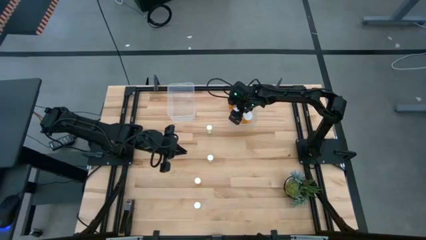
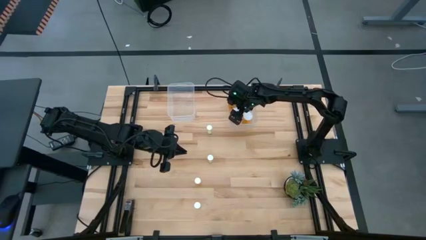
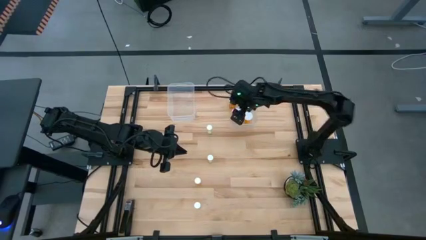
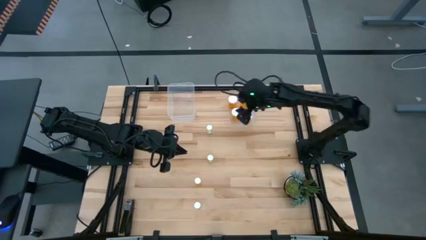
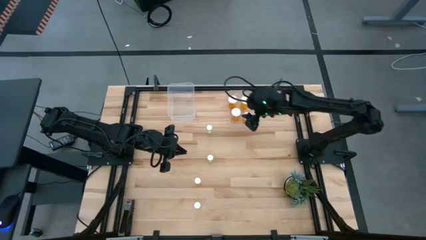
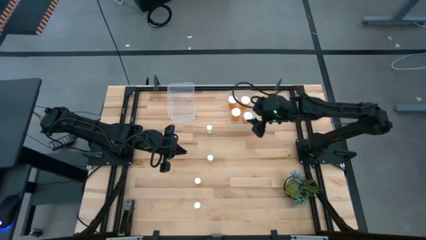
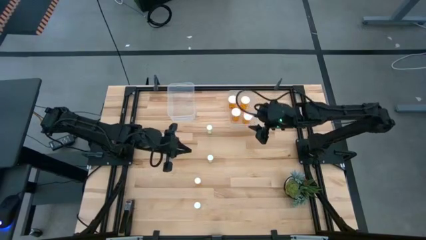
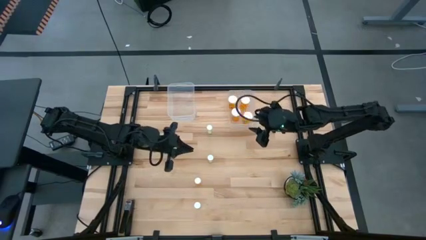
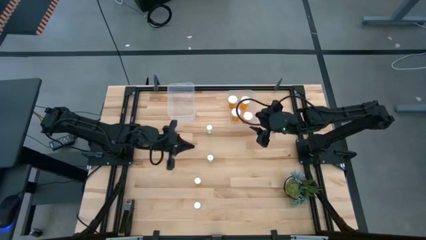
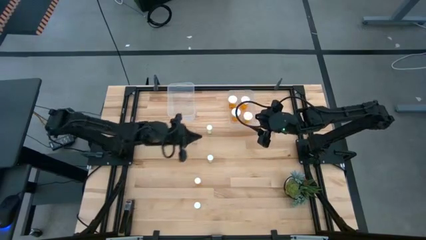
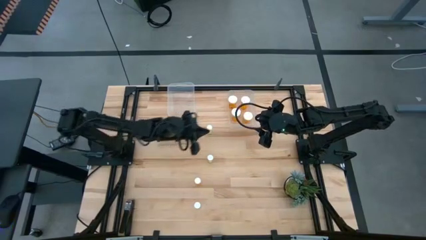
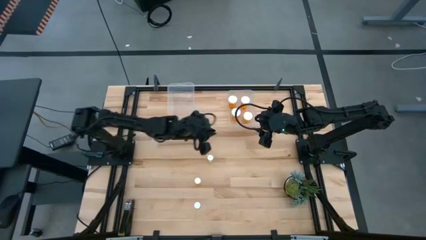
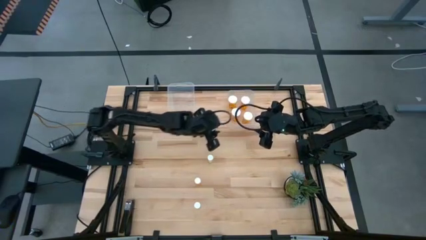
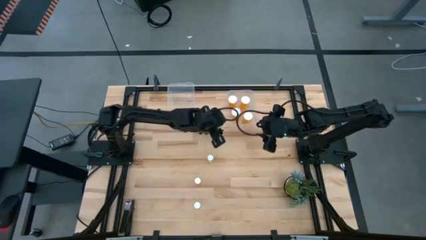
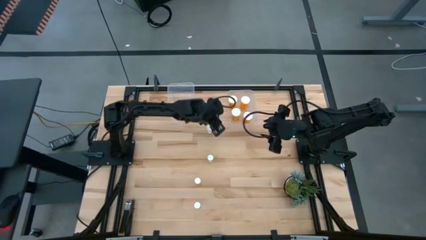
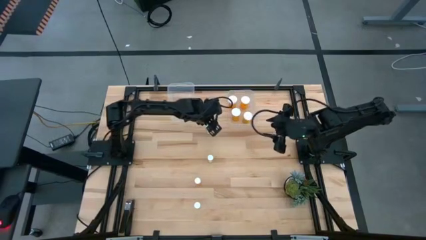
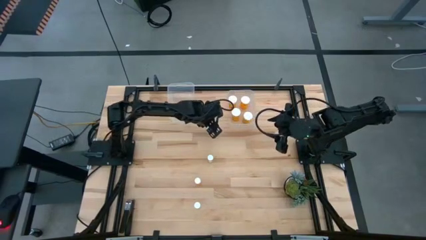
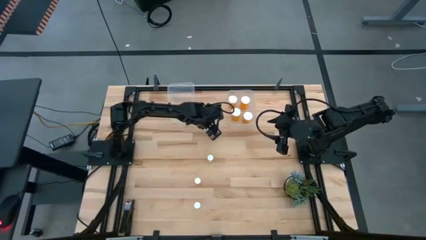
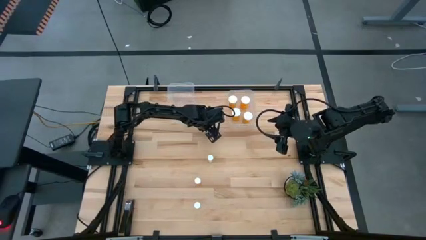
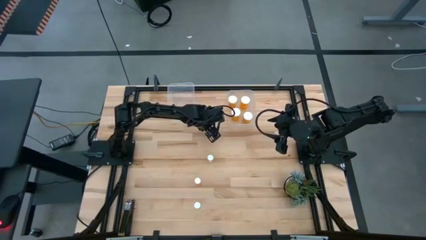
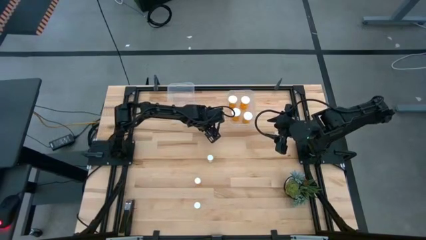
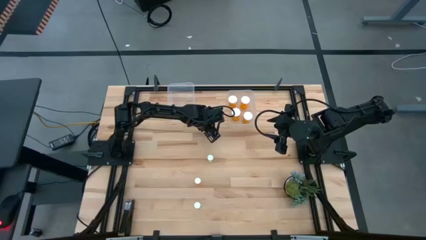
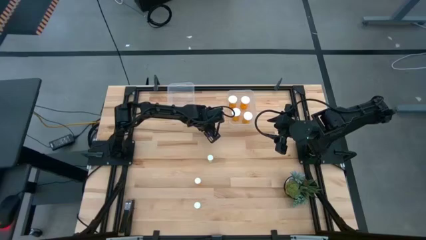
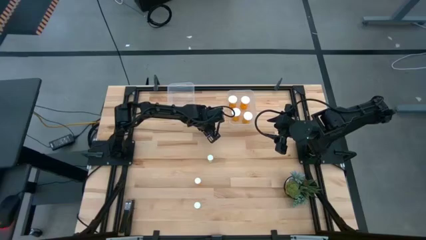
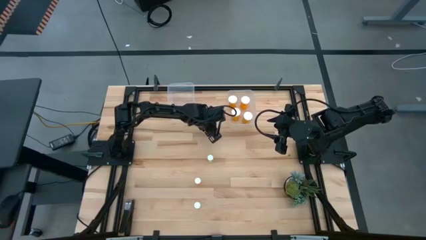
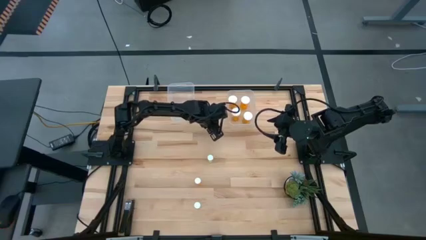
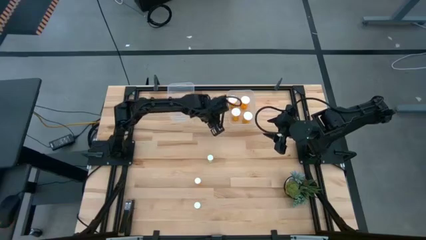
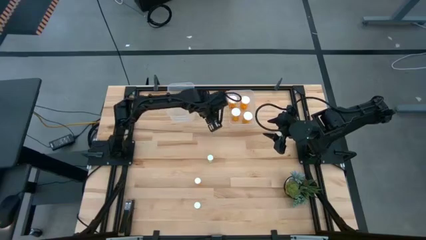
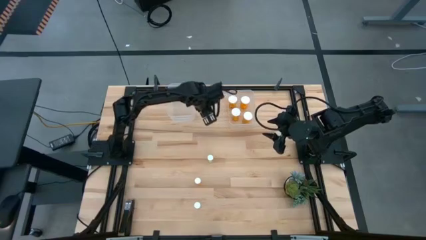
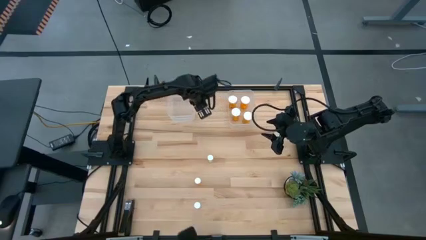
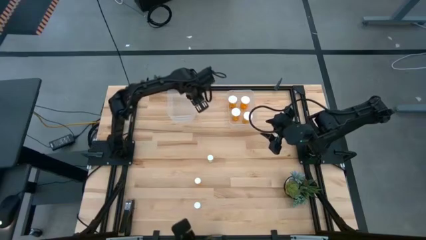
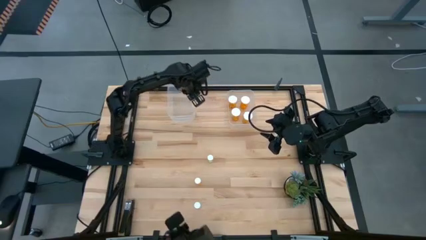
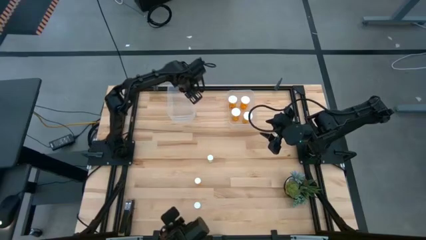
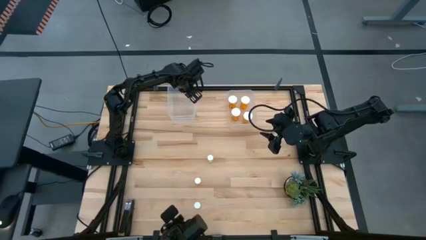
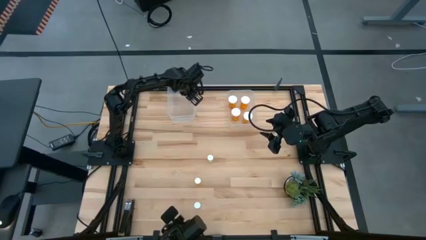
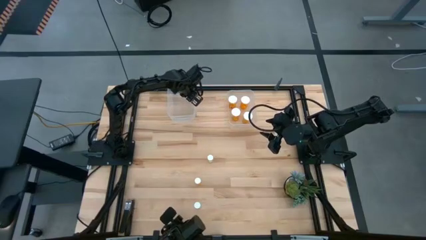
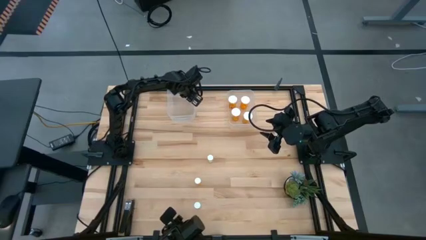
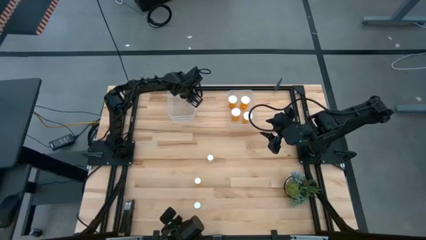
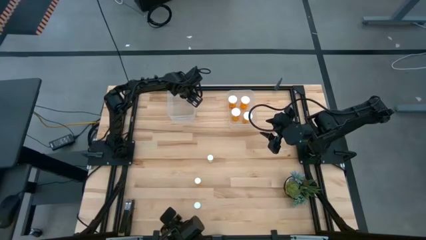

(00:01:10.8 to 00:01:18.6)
Task: Pick and place medicine bottles into bin by pill shape (circle, oval)
Put the yellow pill bottle into the left transparent bin

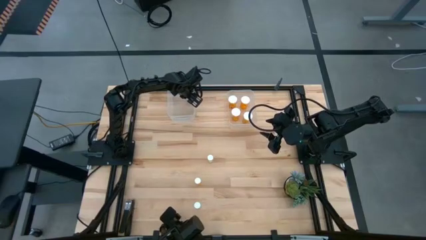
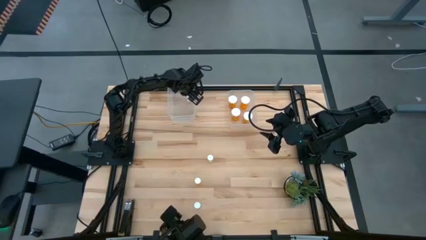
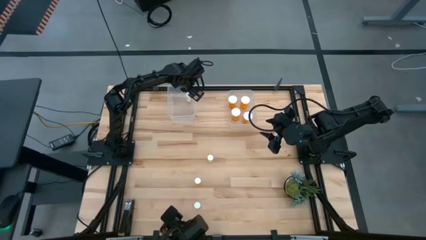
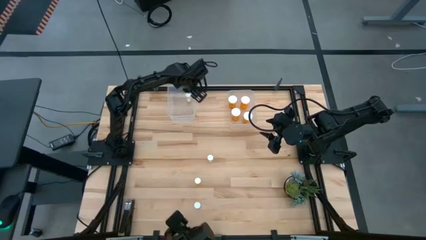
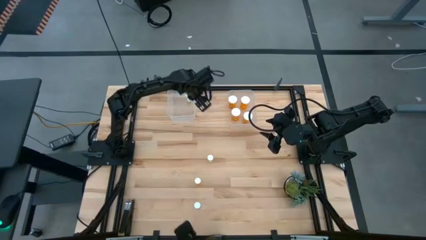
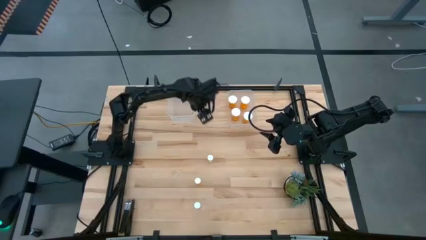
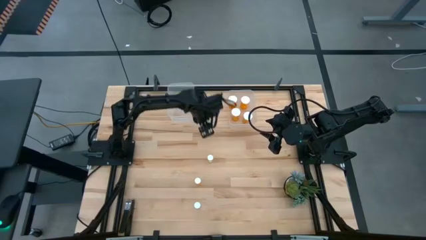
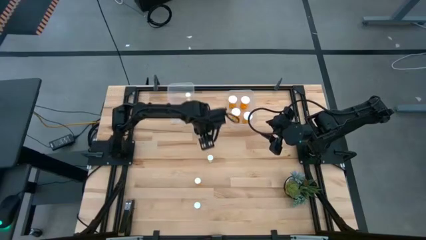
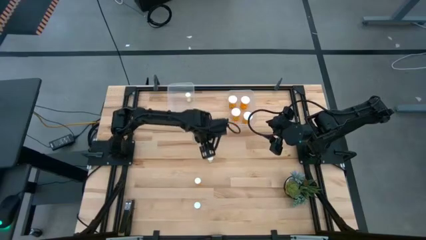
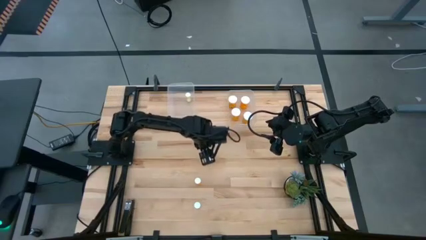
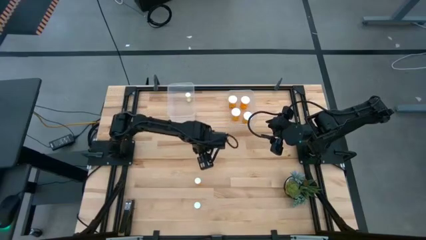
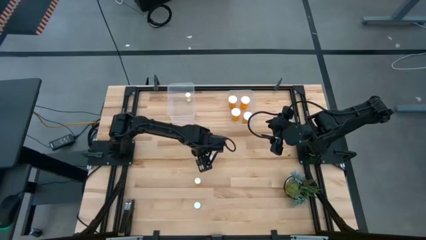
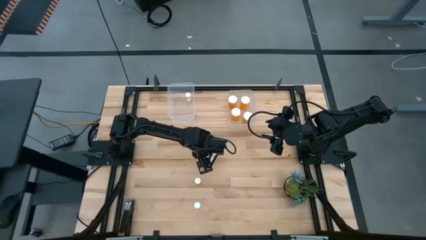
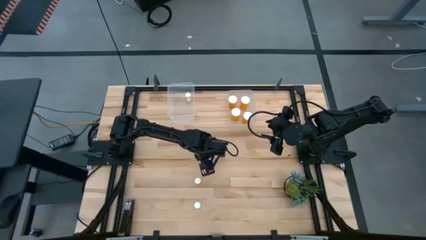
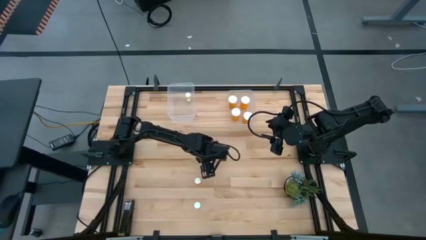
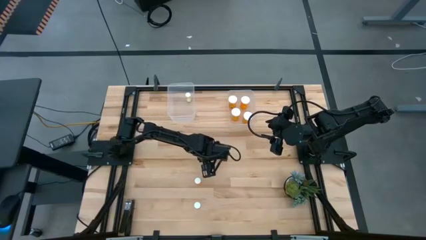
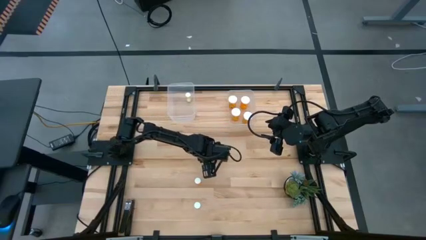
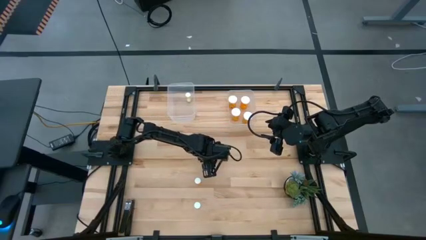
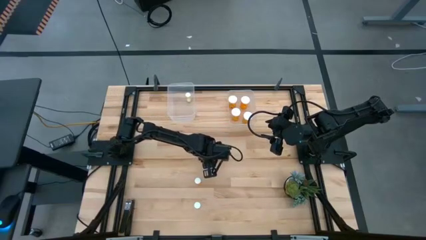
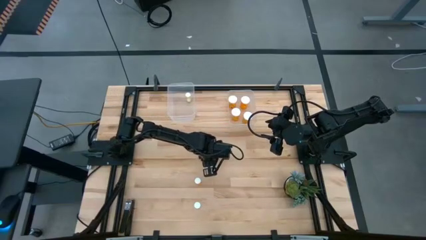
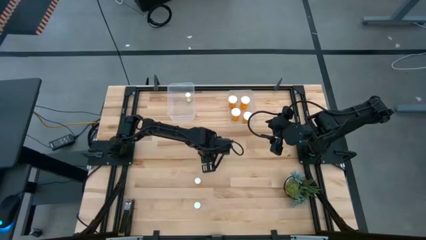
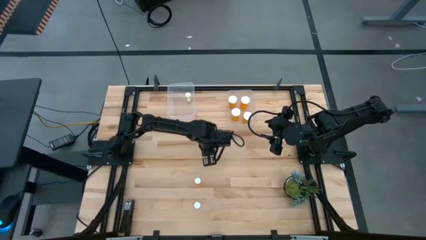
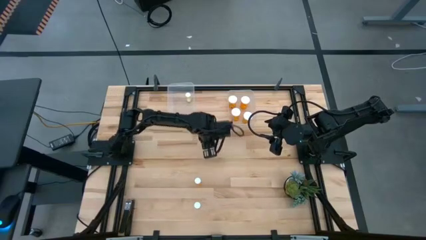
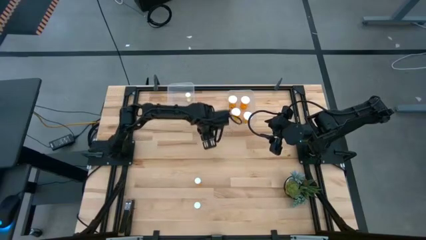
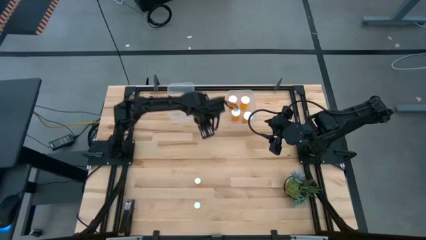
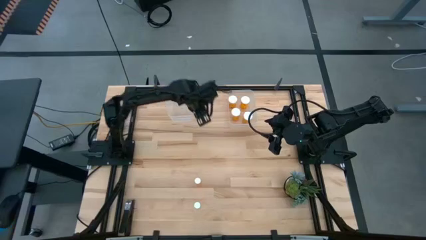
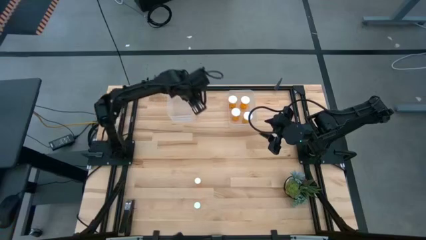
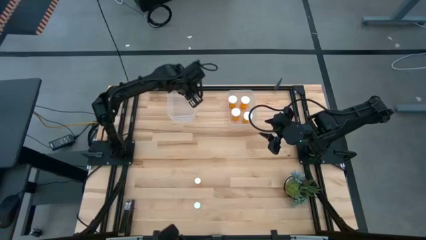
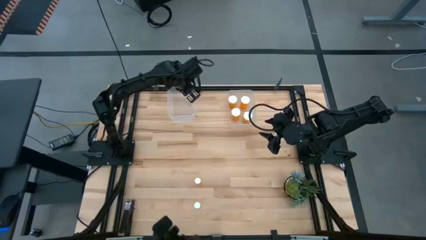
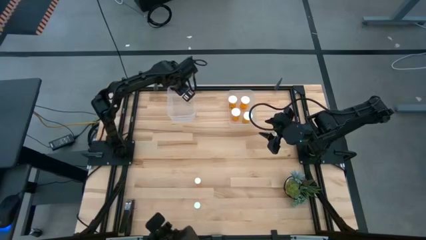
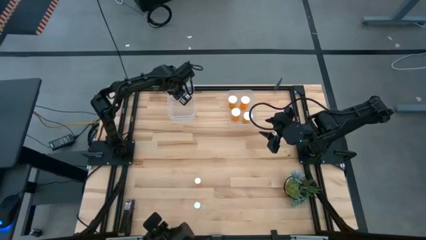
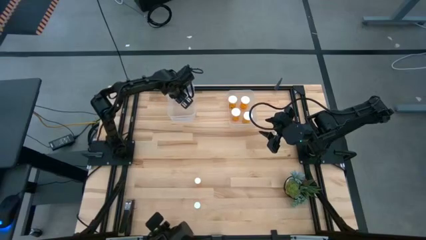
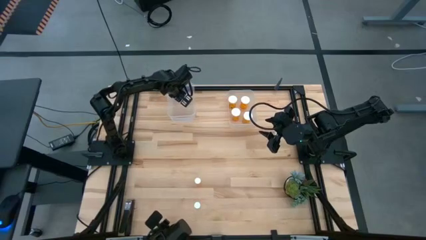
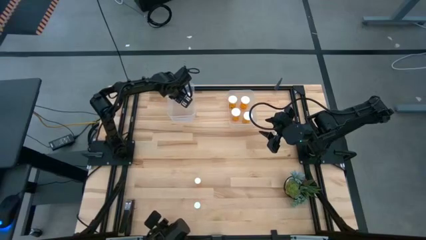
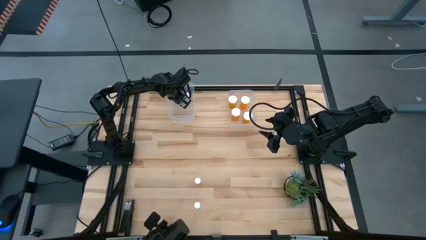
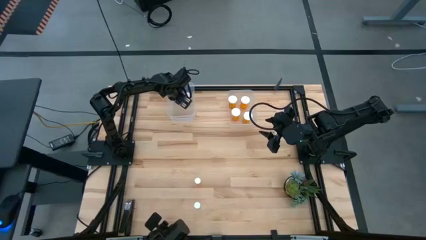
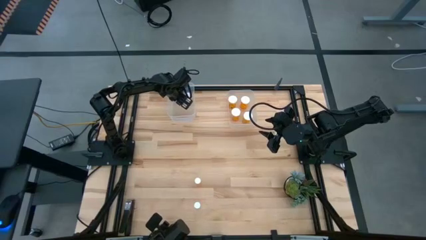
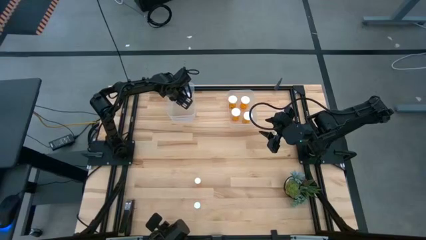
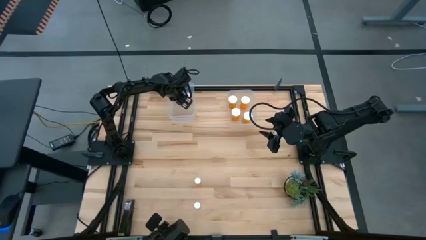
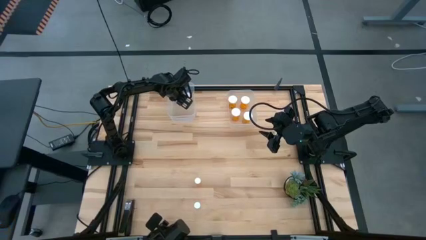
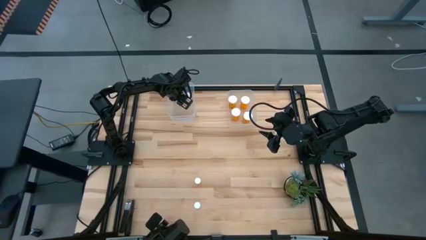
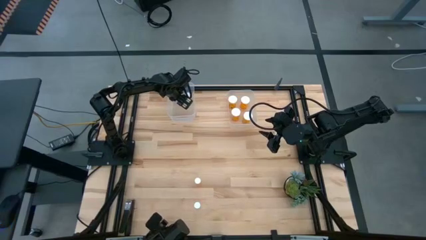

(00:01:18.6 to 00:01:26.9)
Put the yellow pill bottle into the left transparent bin
